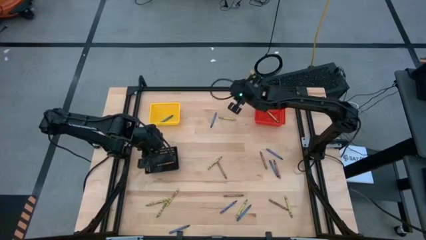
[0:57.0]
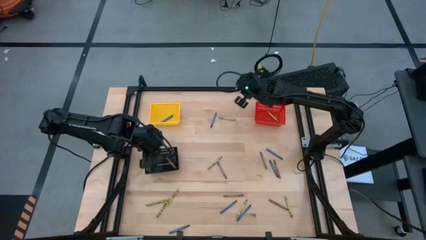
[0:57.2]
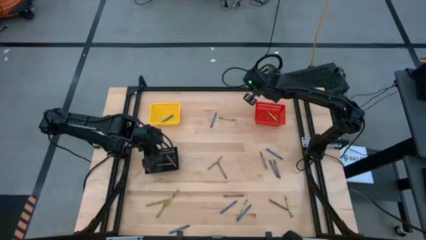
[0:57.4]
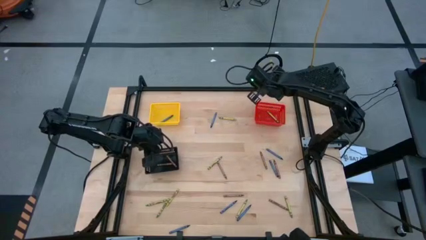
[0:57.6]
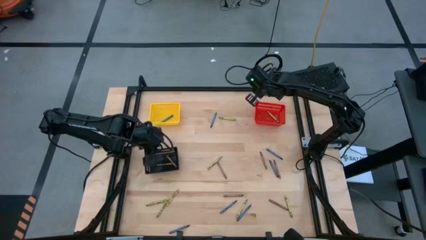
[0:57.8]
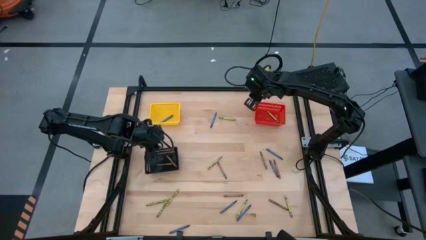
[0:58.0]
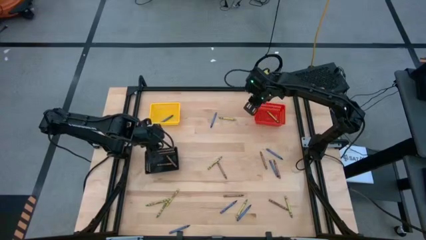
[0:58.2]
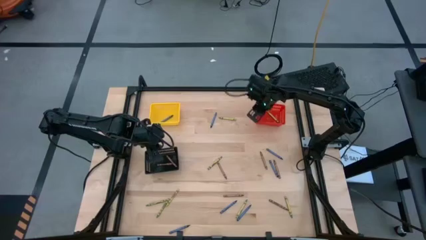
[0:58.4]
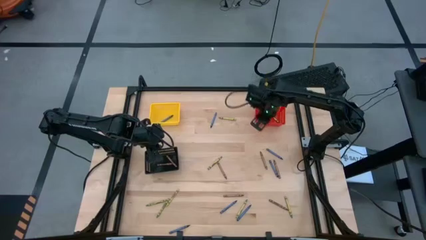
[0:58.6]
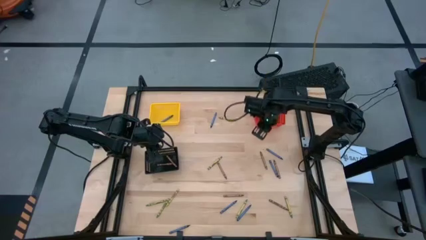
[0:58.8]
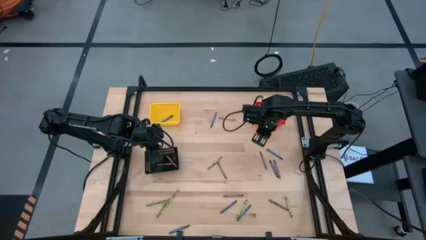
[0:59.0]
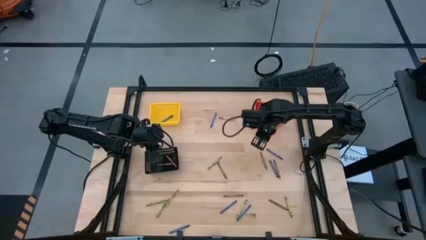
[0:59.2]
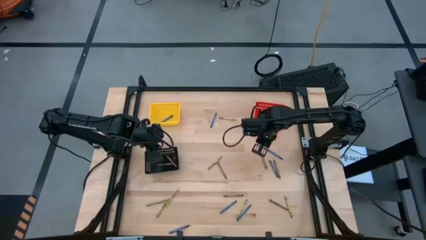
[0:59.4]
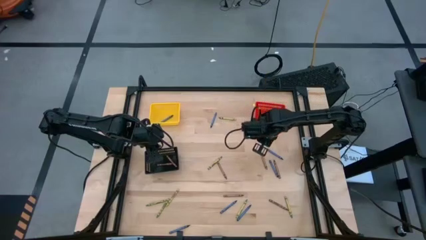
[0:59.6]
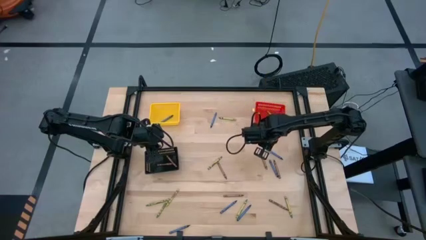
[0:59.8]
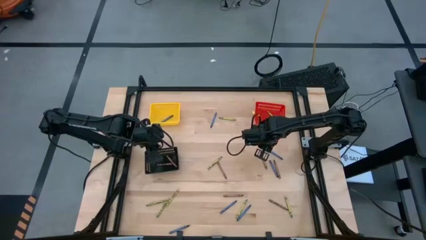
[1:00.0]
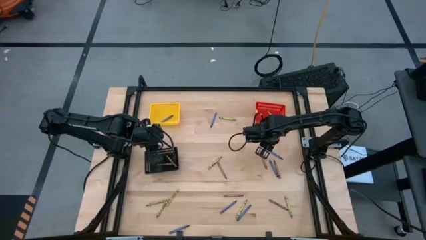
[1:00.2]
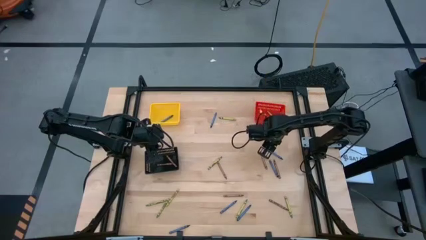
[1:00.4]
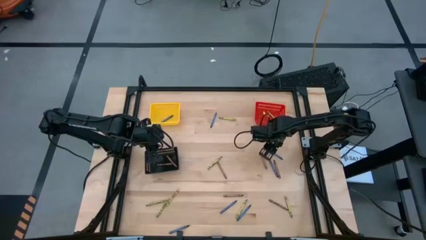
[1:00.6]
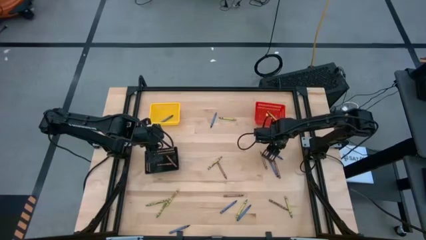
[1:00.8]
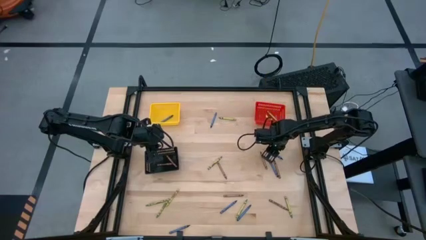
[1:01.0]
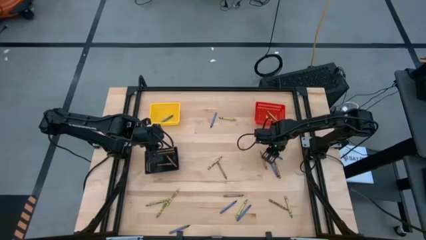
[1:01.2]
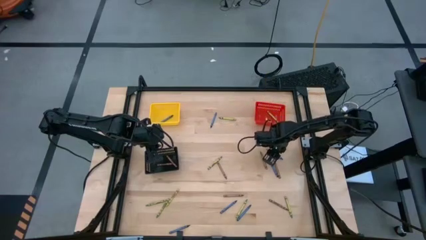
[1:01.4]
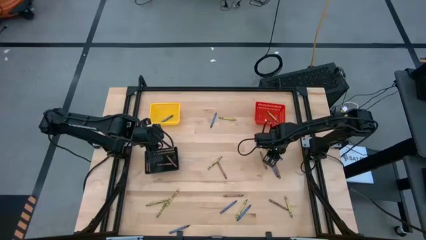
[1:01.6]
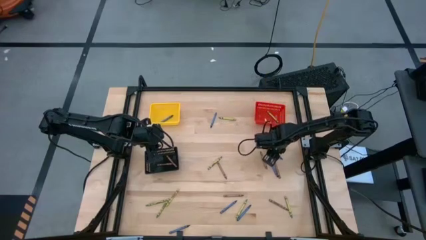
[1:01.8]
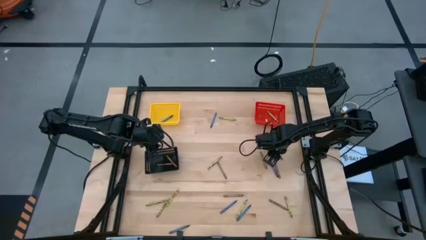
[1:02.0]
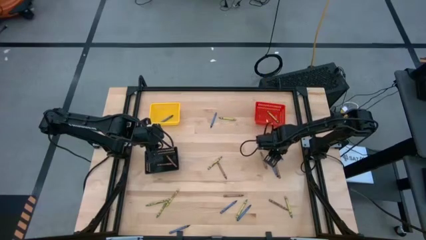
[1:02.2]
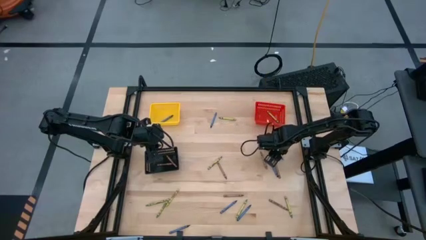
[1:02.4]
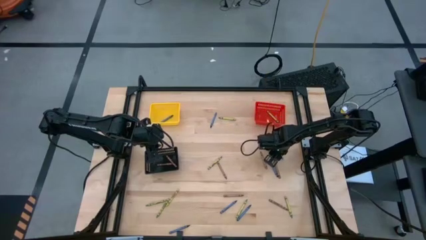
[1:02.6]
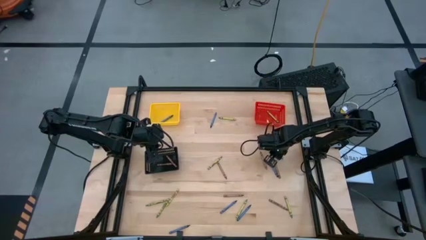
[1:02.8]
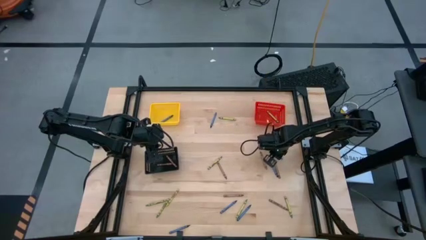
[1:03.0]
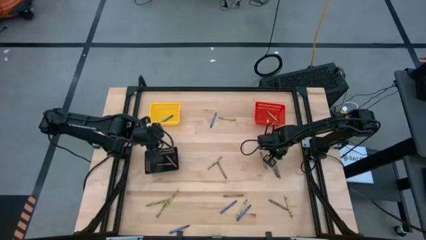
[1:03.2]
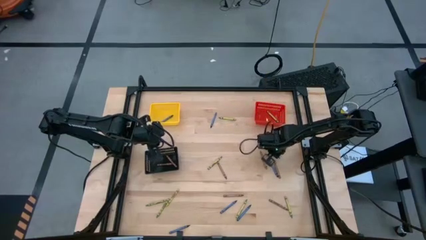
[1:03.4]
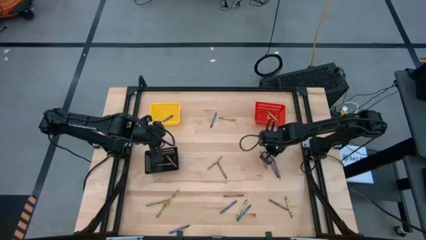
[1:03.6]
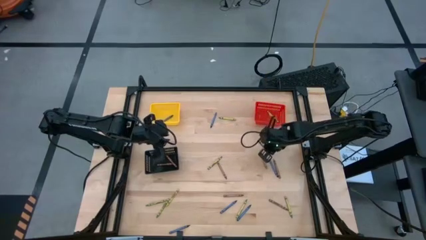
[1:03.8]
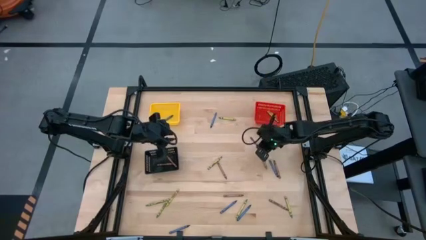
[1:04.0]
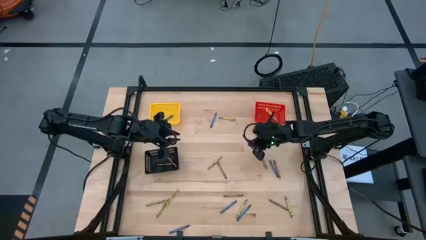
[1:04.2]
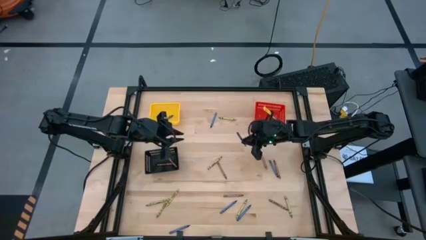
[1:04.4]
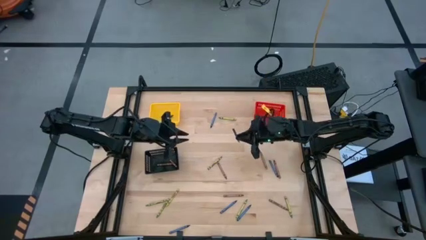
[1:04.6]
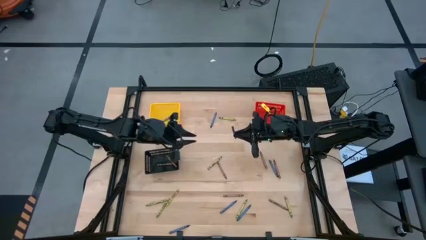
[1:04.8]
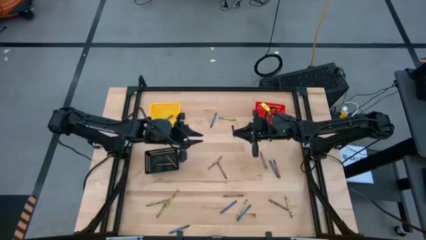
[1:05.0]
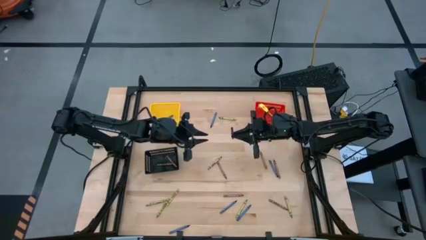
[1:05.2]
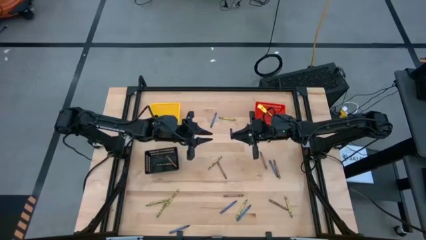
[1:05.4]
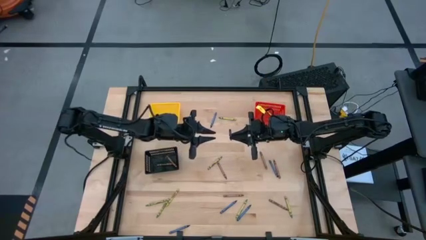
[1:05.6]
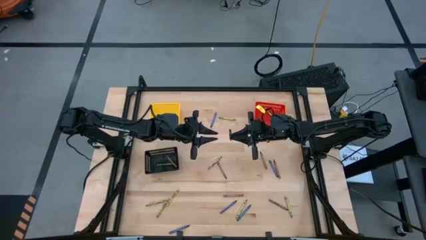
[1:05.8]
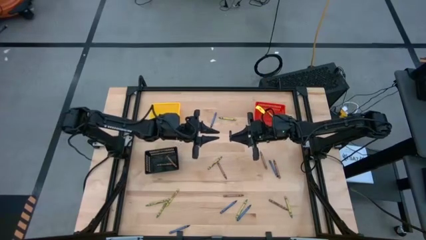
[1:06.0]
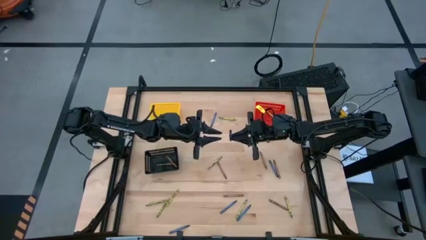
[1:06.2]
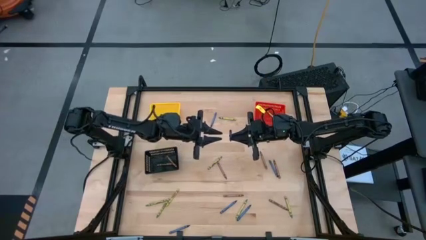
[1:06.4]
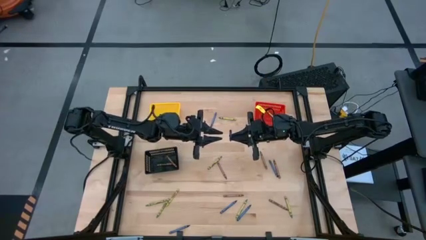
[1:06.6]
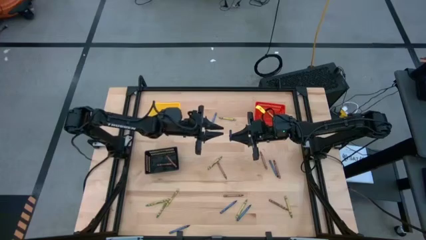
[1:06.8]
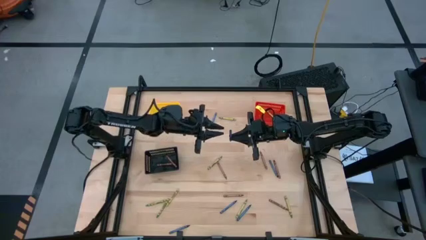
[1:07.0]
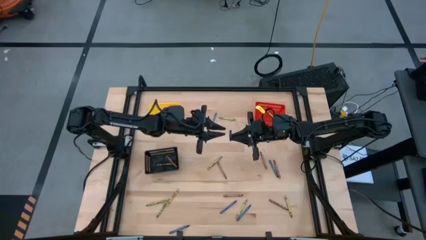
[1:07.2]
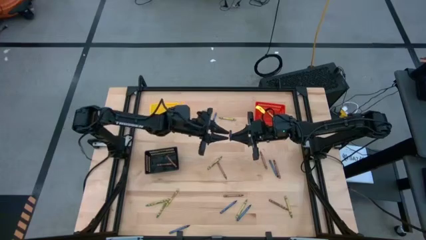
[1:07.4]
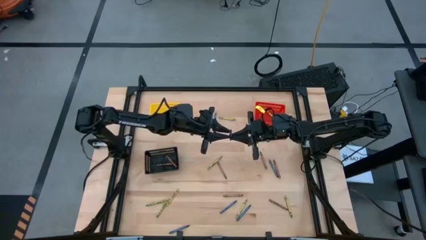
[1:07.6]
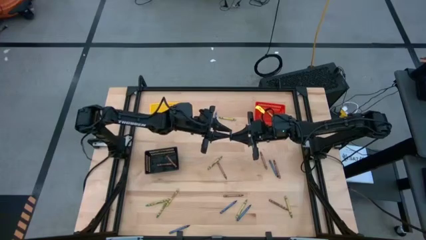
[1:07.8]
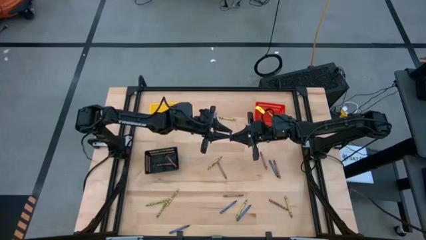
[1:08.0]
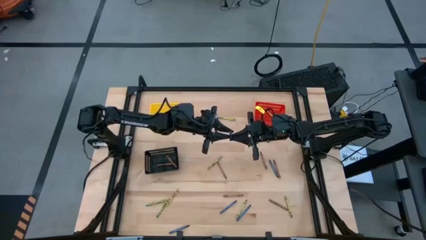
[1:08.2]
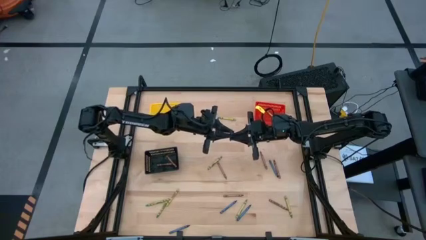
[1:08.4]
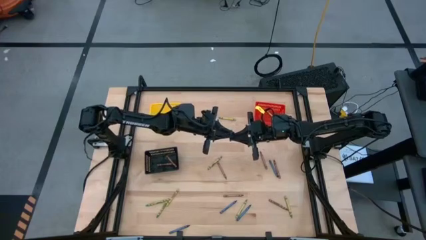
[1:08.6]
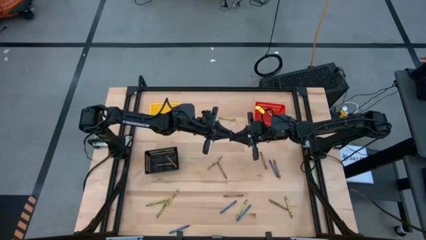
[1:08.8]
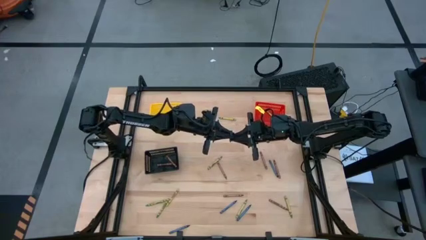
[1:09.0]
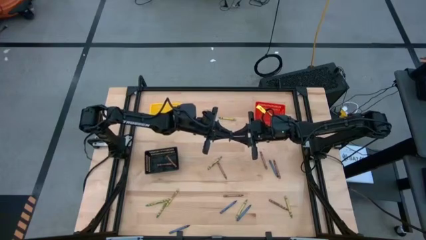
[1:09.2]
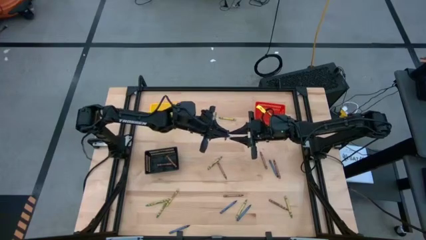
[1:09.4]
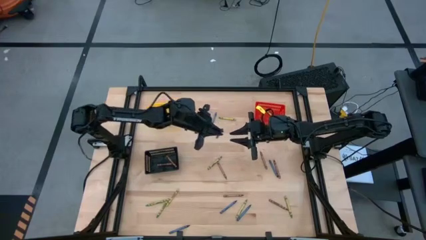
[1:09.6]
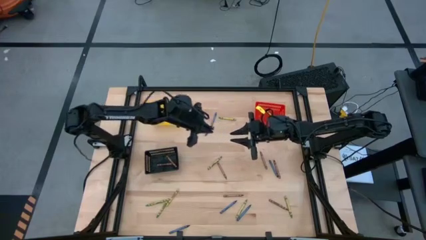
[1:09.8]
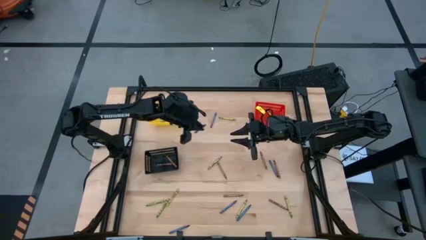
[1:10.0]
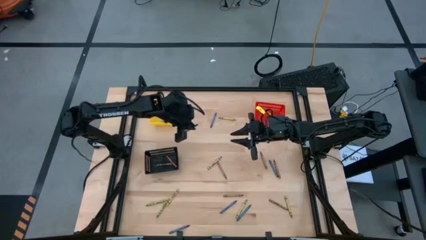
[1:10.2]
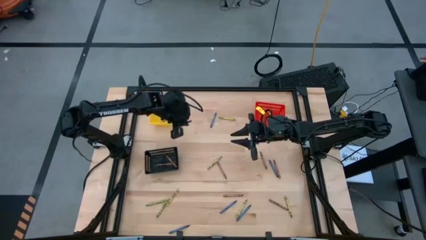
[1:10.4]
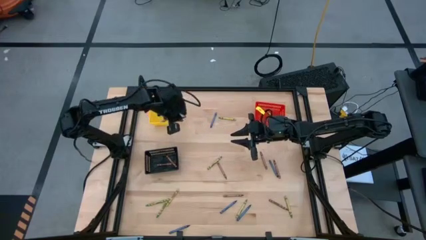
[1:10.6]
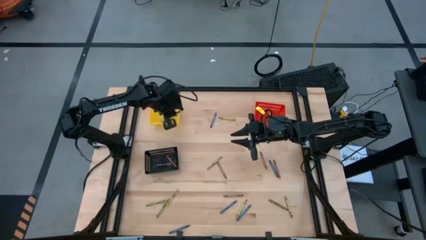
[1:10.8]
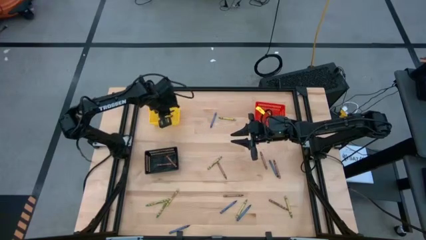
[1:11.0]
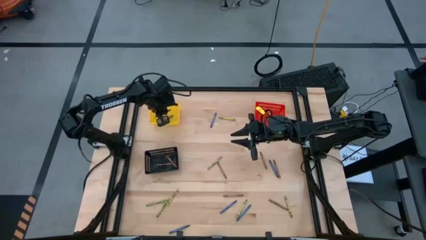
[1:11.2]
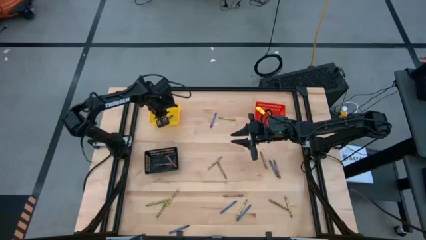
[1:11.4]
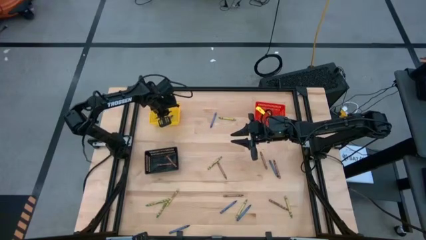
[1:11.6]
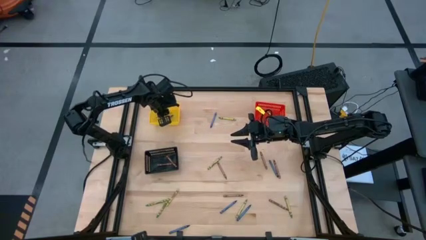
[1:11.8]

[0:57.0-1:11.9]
Task: Sort crayons
Put the blue crayon into the yellow bin
